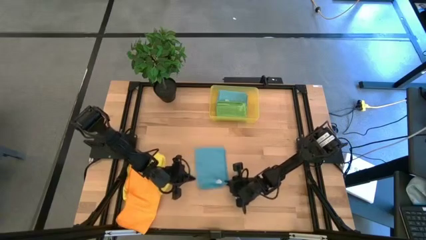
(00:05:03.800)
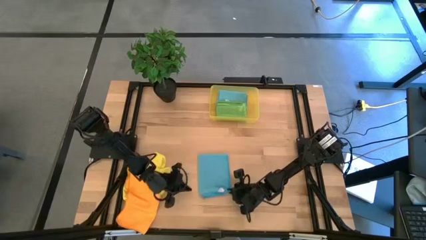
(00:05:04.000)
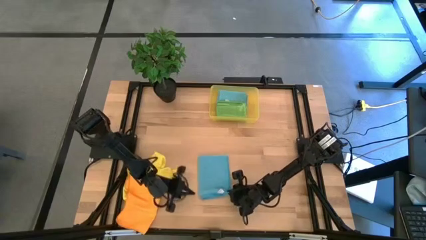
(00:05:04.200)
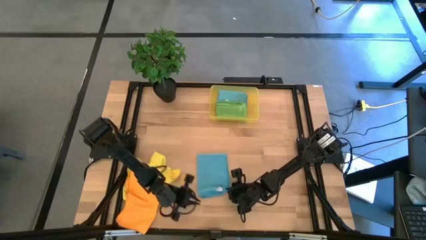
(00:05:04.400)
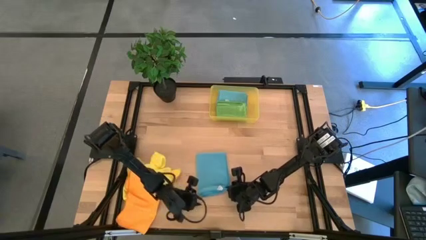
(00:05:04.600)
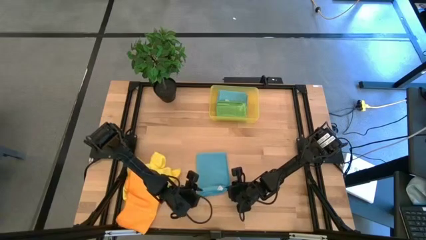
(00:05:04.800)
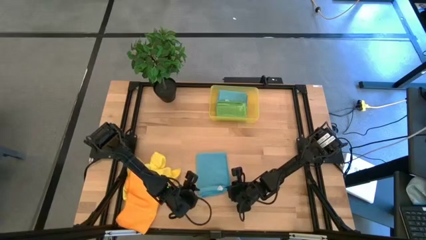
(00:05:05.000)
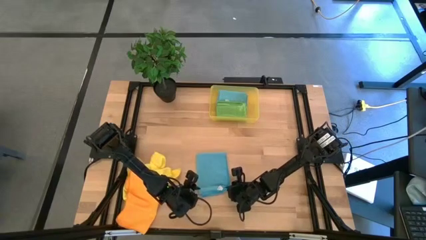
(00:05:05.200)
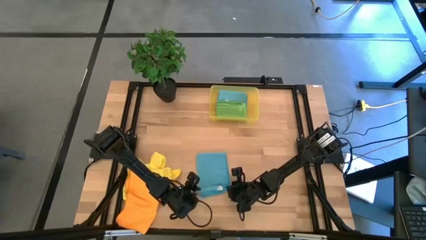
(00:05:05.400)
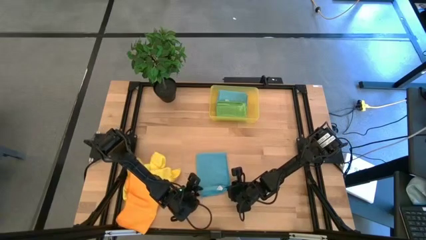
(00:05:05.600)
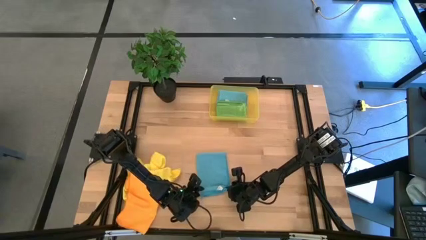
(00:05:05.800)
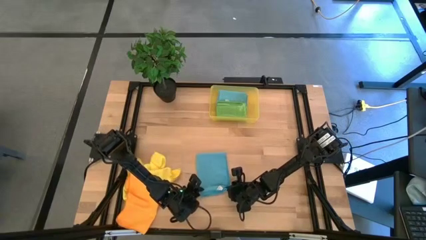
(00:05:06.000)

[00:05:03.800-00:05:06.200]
Task: Fold microfiber towels
Fold the blue microfiber towel

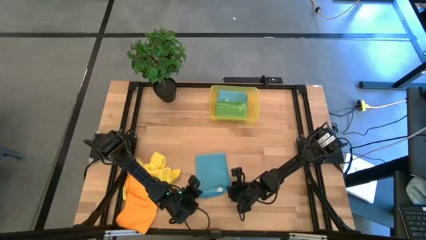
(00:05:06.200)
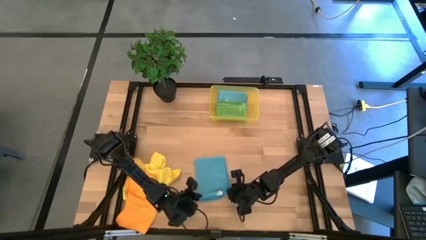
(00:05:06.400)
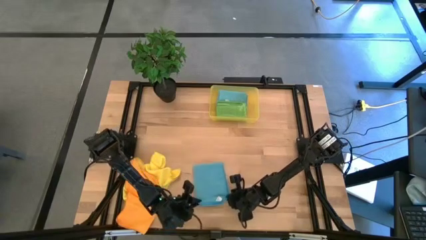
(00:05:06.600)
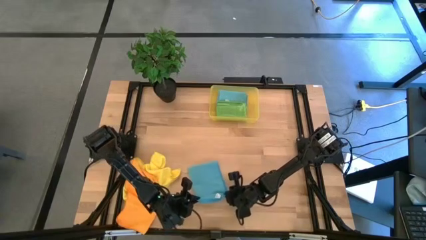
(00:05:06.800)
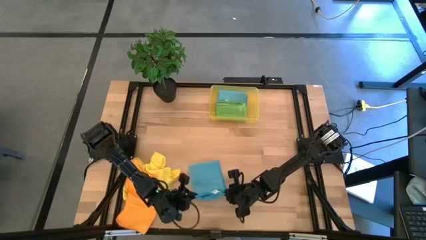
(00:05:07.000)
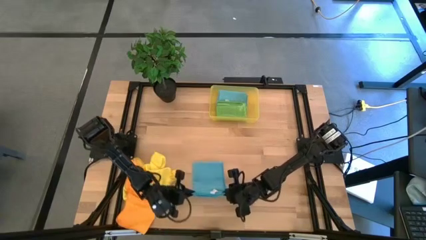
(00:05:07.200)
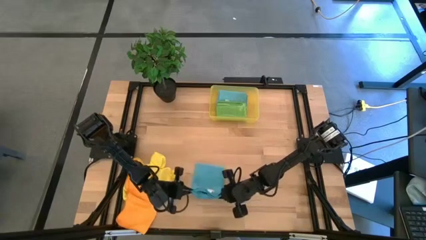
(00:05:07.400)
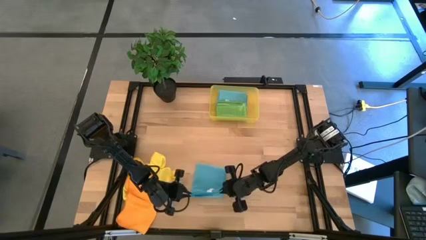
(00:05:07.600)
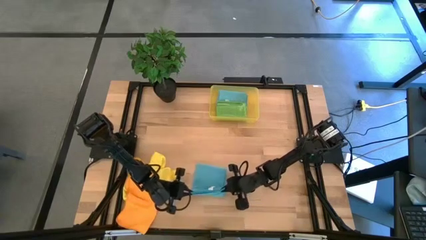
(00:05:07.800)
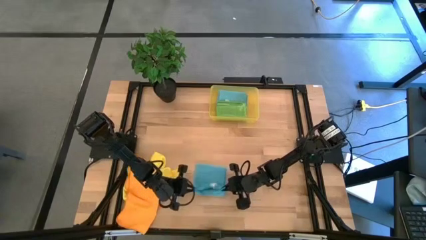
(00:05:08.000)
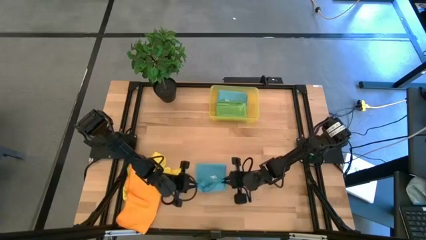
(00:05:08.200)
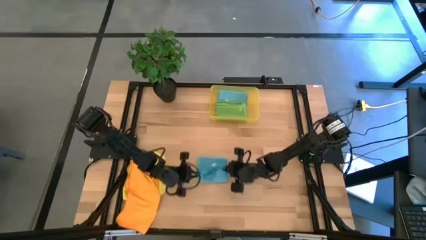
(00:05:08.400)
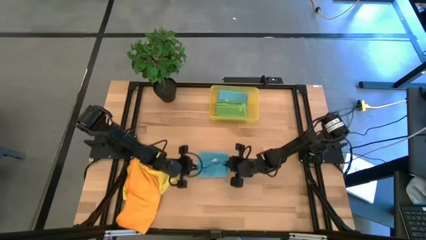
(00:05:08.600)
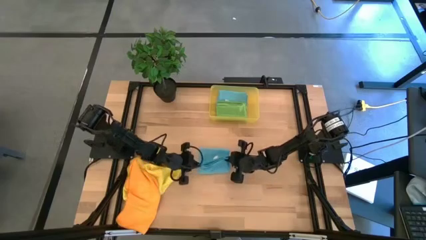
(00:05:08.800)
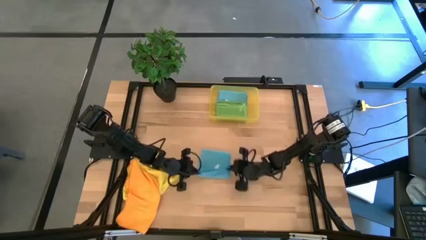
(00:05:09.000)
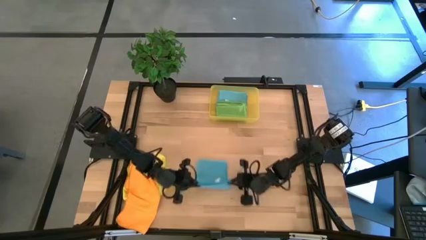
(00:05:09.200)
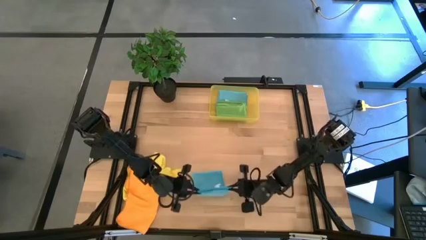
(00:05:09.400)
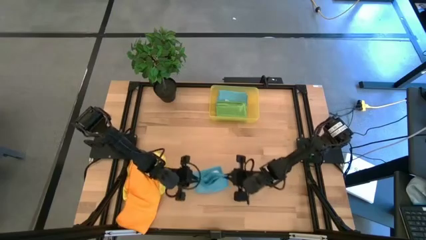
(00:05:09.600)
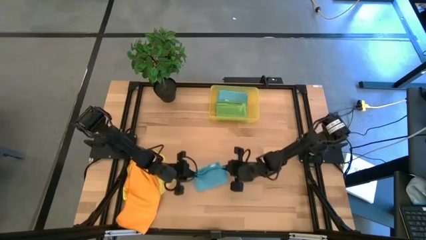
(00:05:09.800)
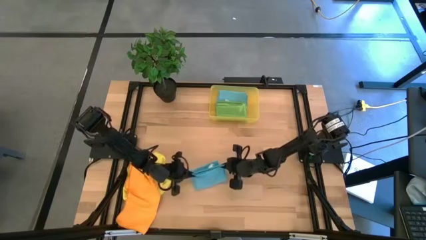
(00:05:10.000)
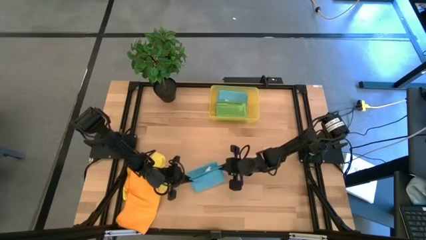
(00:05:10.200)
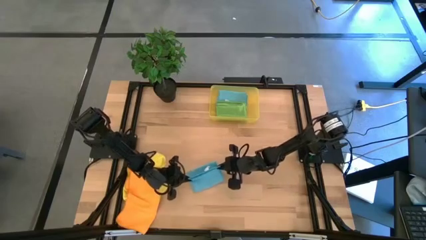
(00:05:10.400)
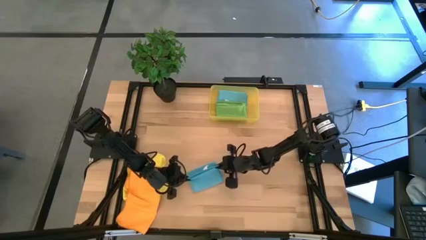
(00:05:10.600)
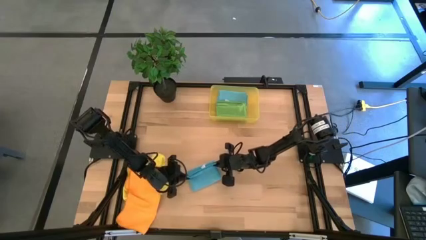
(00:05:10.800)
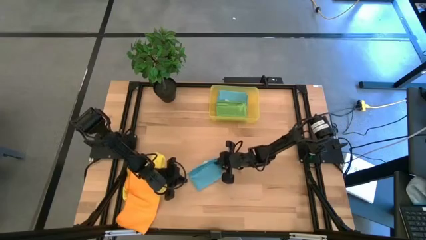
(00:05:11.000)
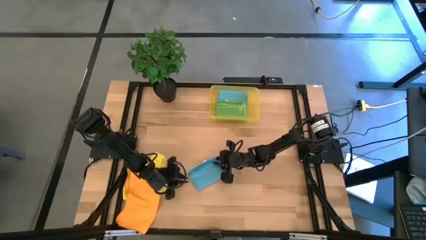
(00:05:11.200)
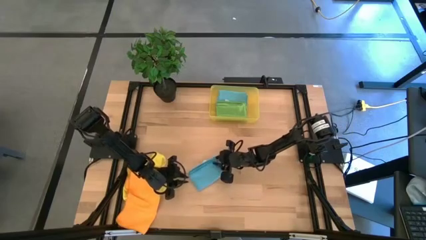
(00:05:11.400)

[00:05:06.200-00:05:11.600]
Fold the blue microfiber towel

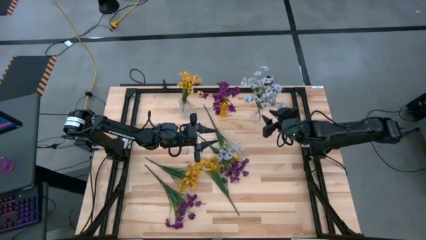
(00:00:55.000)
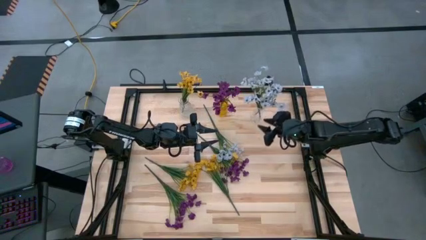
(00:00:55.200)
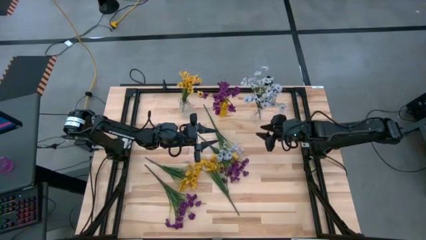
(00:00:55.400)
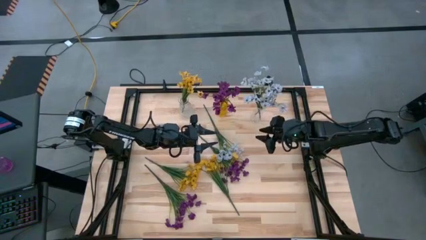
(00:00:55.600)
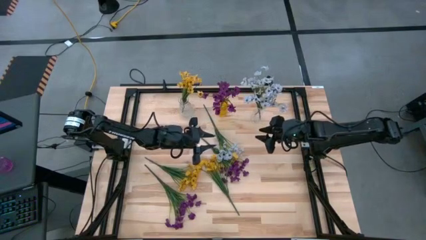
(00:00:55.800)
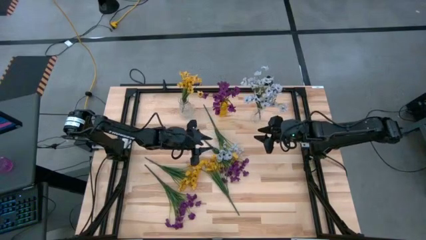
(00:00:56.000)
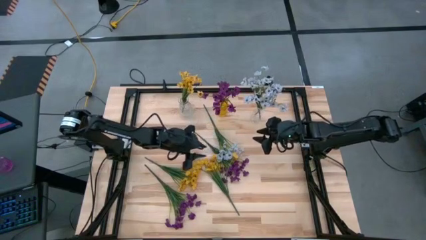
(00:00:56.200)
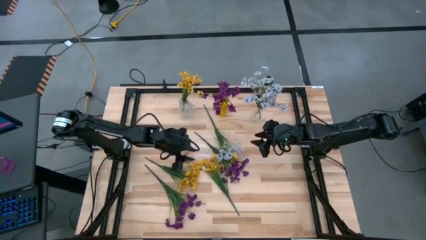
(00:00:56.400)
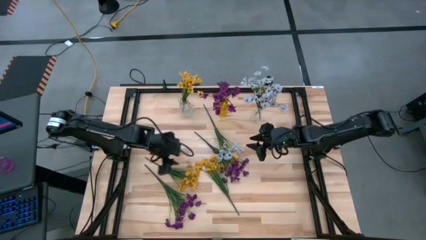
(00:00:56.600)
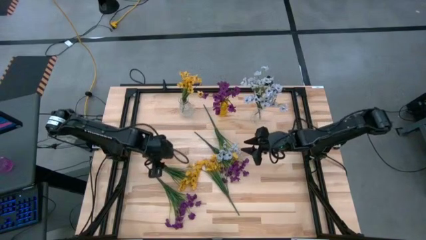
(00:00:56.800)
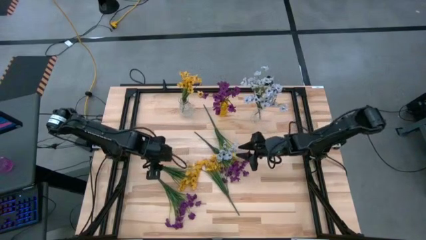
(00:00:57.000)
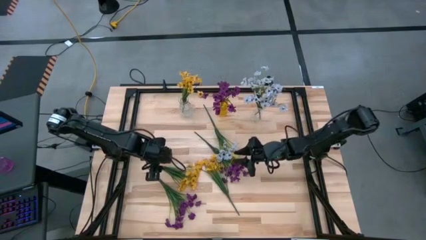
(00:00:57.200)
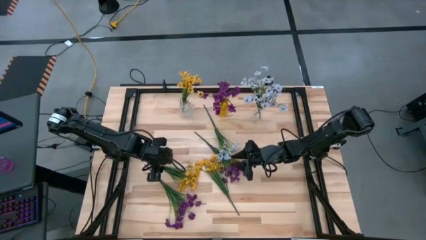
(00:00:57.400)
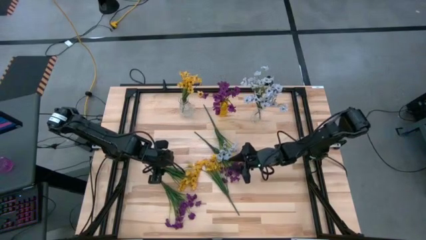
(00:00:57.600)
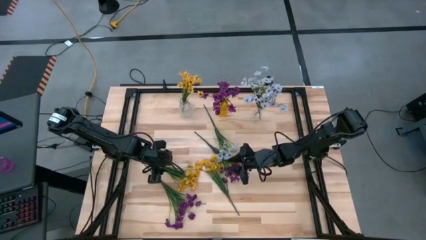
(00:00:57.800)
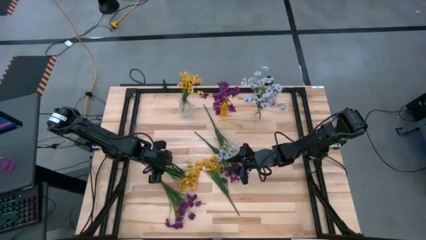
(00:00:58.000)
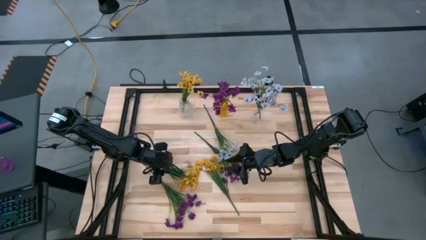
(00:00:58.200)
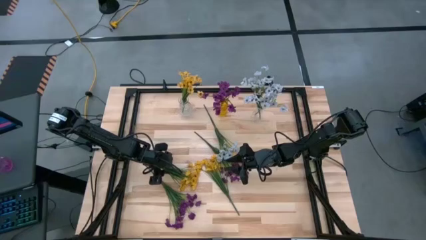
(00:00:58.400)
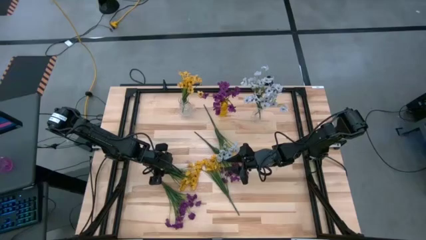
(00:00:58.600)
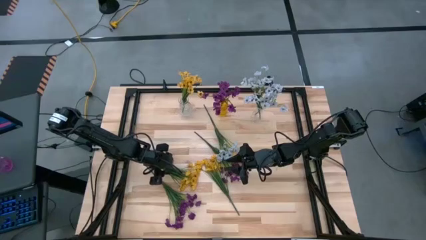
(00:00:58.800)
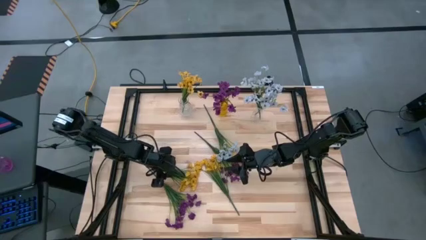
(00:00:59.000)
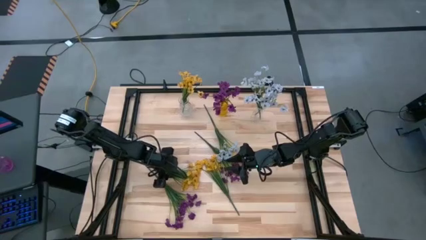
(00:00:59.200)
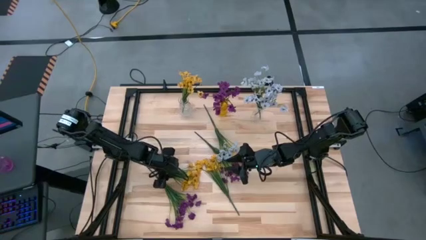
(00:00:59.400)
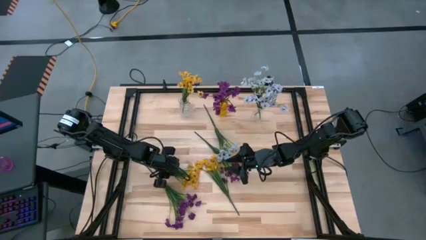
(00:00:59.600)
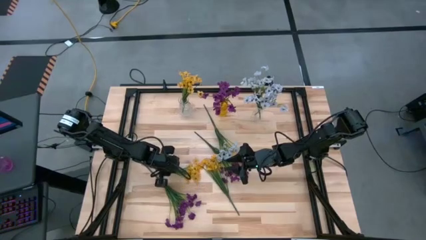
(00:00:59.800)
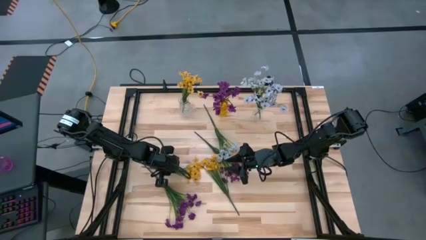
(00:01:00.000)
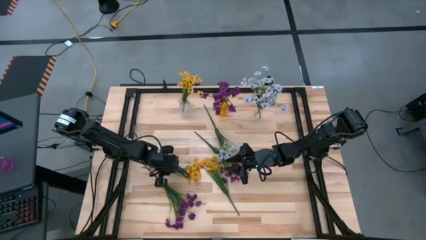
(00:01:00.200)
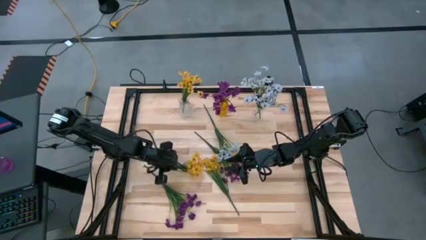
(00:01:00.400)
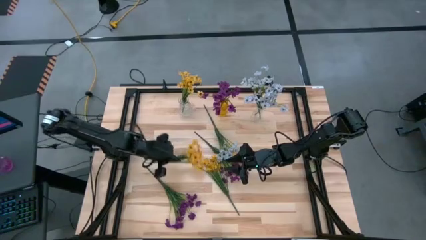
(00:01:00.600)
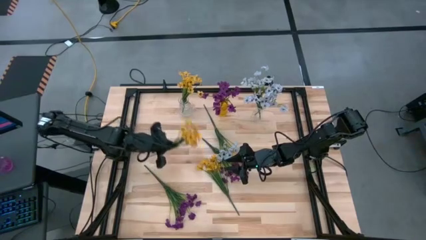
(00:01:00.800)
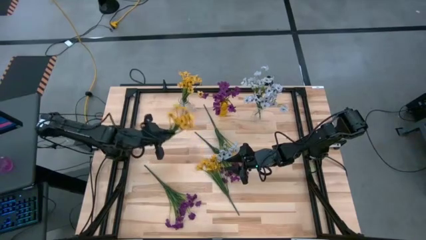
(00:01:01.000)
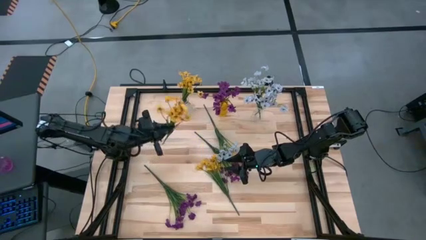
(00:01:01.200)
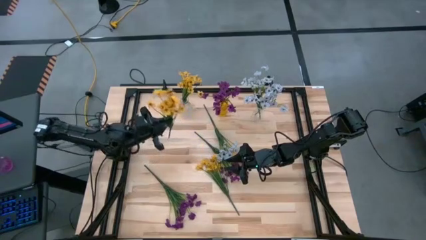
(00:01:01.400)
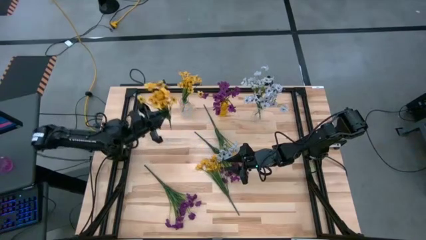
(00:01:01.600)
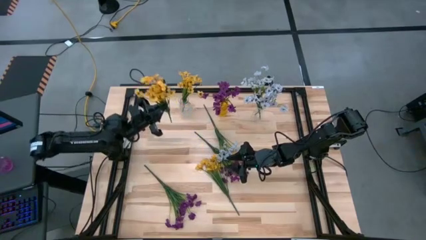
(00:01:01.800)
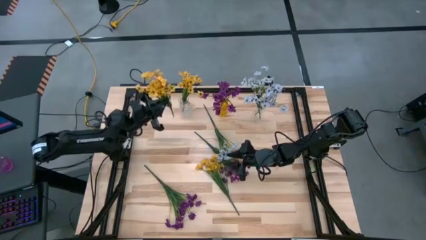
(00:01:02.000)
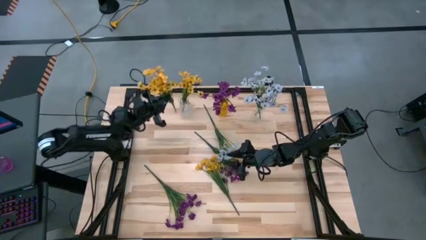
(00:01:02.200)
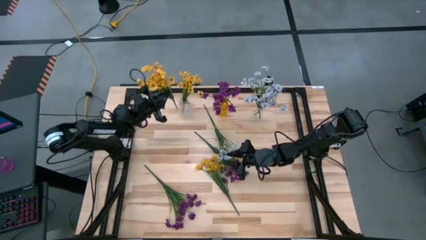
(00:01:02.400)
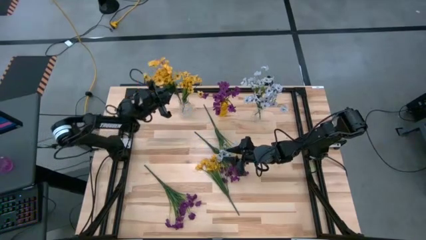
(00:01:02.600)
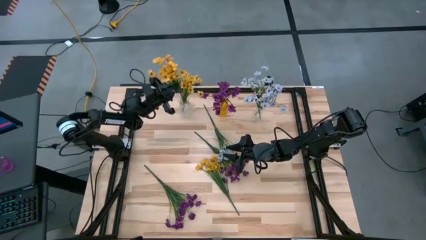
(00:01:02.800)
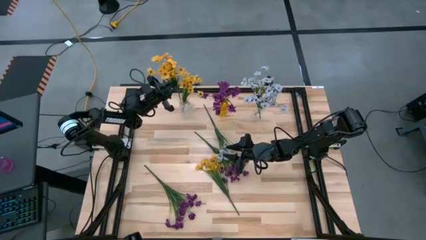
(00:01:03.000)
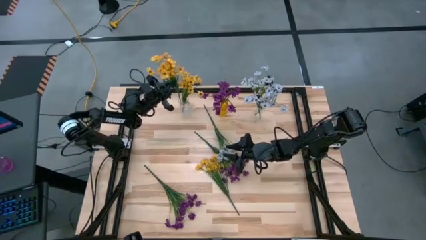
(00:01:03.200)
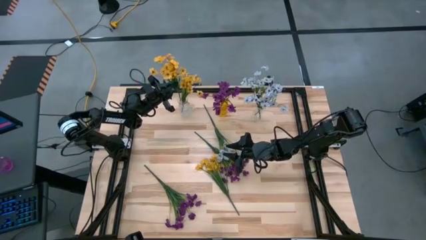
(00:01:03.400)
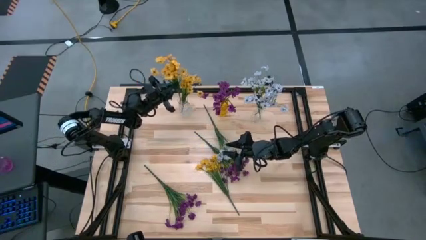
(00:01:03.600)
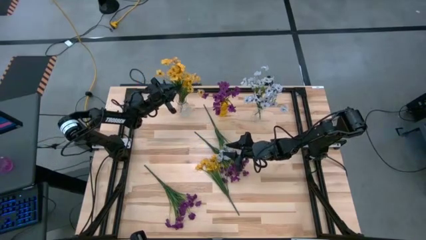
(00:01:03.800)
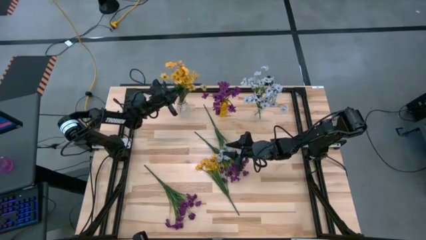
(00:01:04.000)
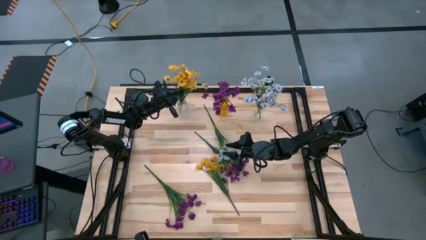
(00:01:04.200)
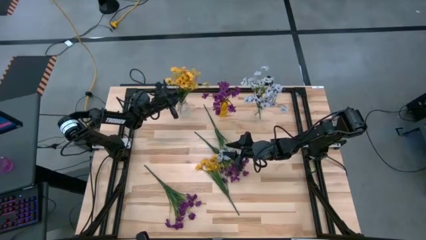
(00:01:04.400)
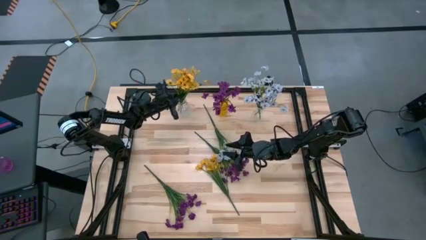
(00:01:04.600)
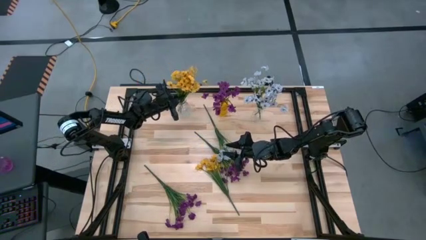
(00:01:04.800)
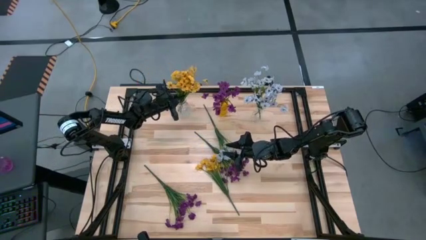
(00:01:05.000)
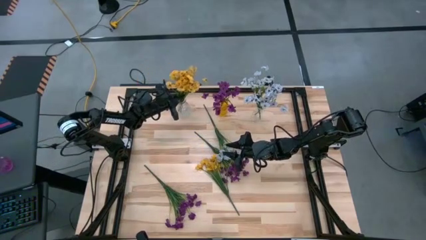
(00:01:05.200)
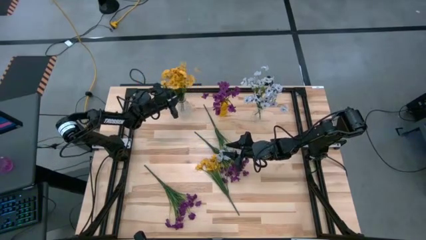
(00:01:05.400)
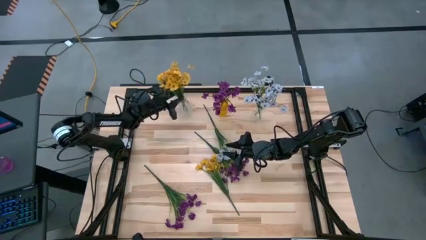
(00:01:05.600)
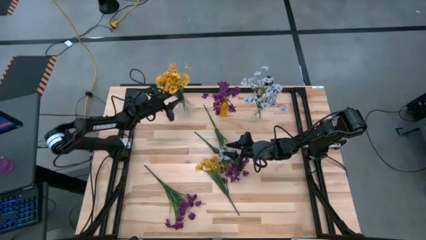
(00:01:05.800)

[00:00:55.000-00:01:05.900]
Task: Sort flowers into vase by color
Put the left yellow flowers into the left transparent vase
